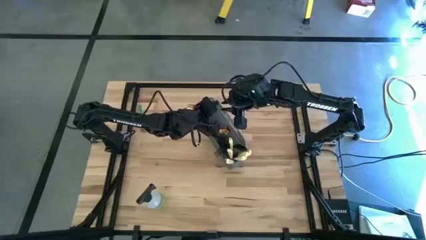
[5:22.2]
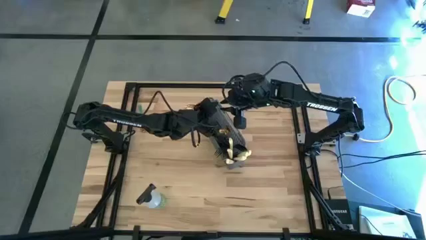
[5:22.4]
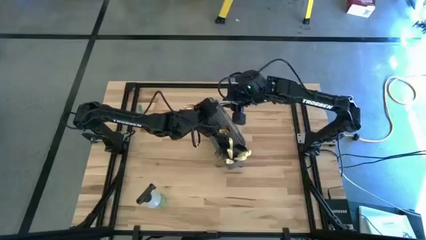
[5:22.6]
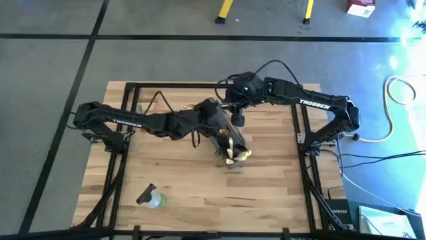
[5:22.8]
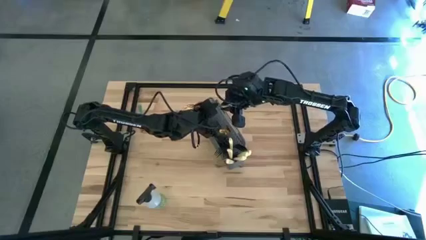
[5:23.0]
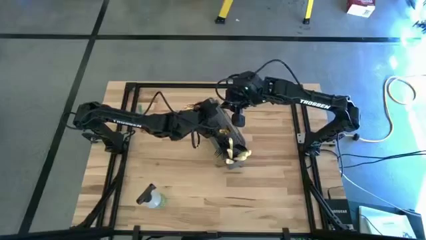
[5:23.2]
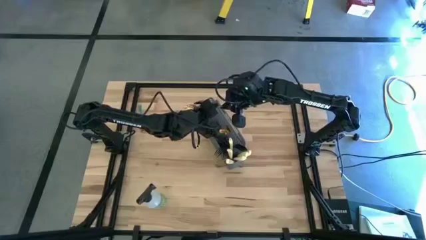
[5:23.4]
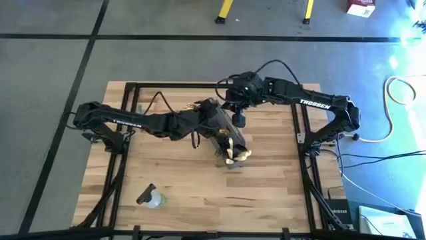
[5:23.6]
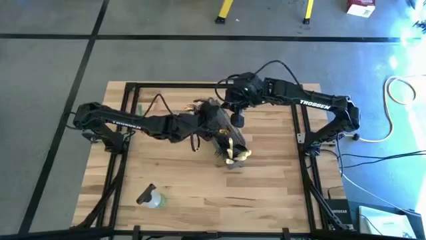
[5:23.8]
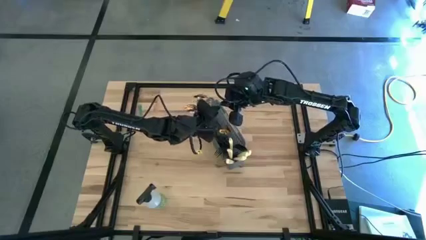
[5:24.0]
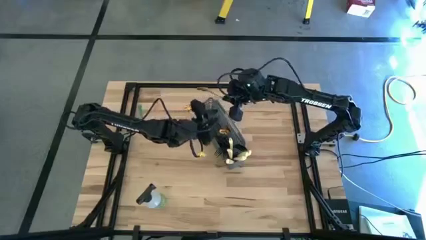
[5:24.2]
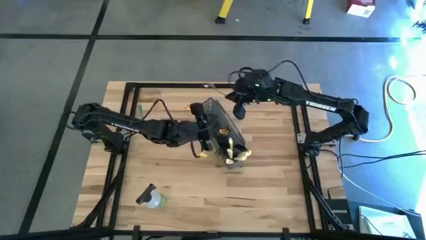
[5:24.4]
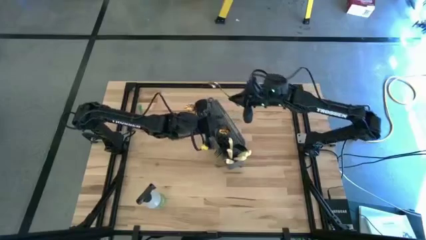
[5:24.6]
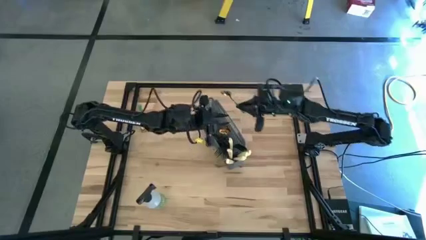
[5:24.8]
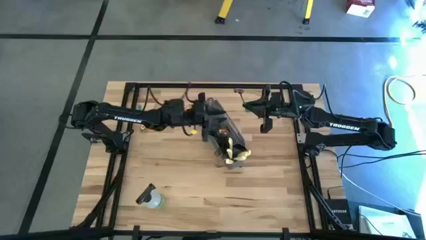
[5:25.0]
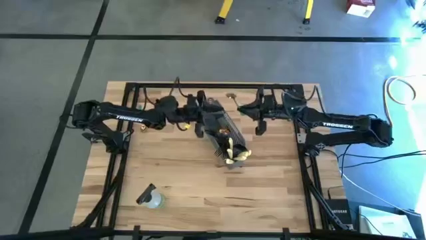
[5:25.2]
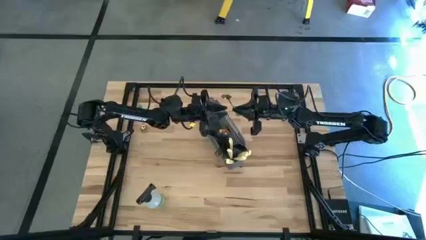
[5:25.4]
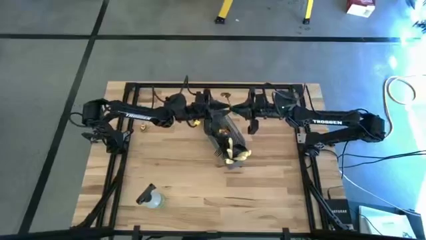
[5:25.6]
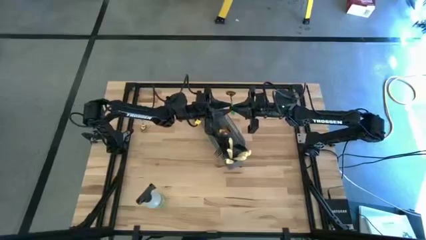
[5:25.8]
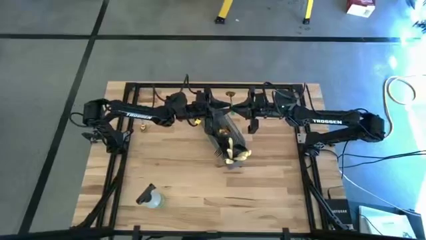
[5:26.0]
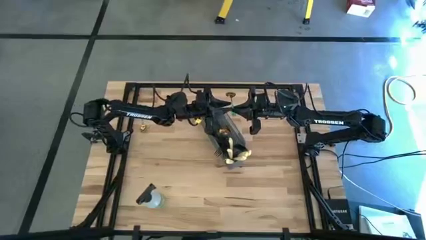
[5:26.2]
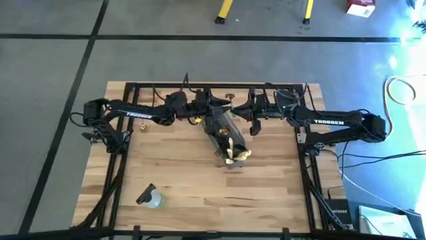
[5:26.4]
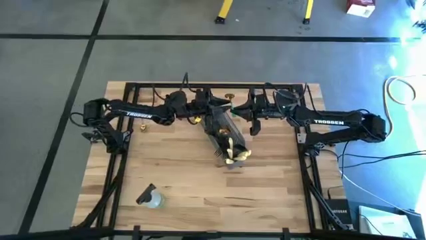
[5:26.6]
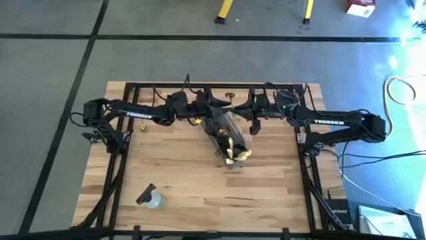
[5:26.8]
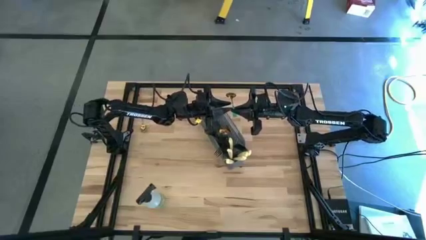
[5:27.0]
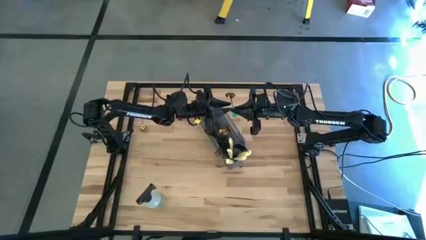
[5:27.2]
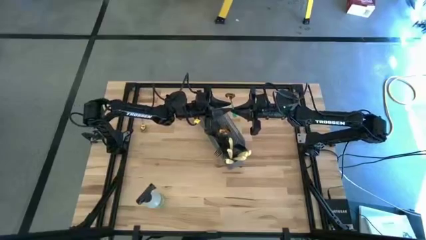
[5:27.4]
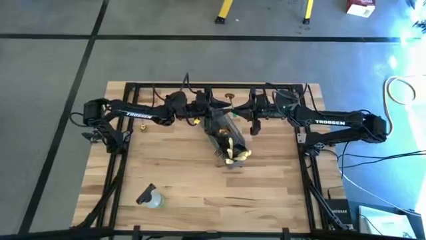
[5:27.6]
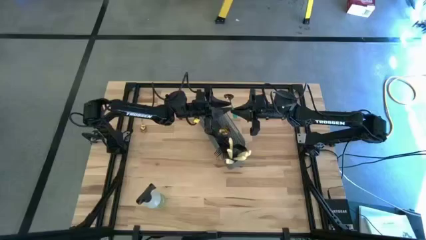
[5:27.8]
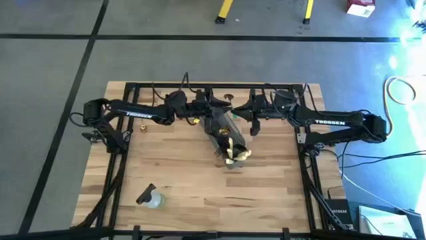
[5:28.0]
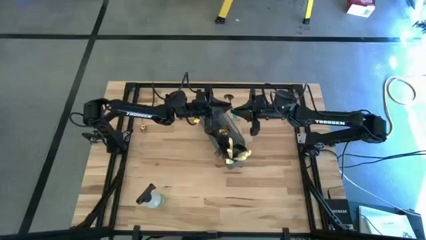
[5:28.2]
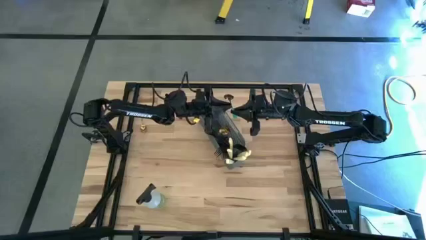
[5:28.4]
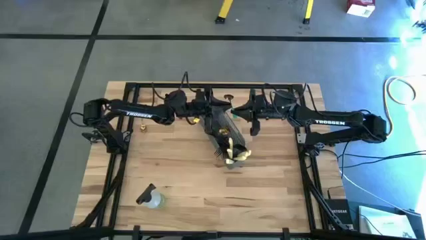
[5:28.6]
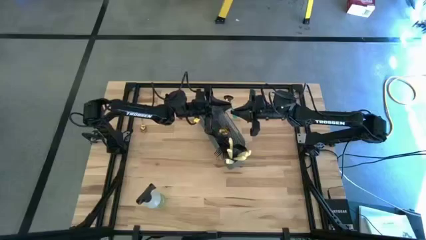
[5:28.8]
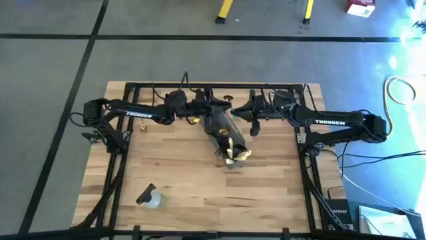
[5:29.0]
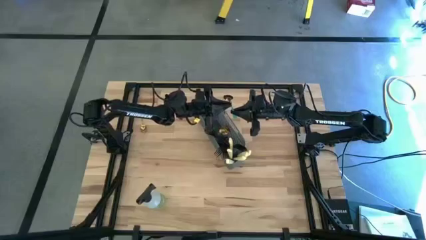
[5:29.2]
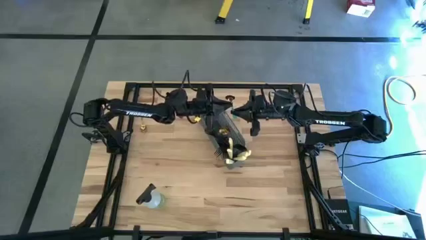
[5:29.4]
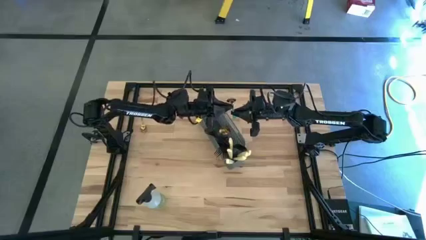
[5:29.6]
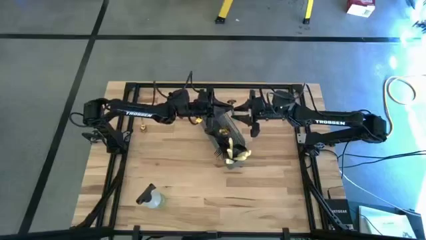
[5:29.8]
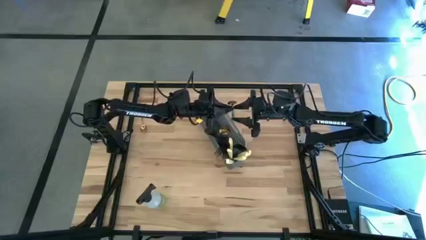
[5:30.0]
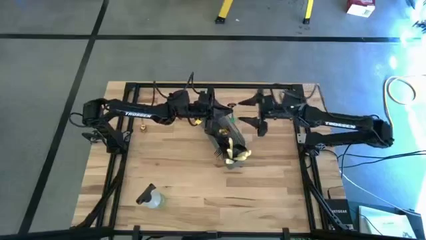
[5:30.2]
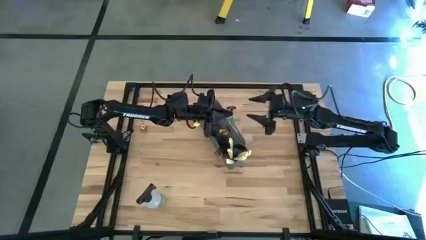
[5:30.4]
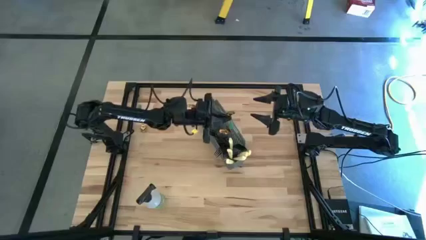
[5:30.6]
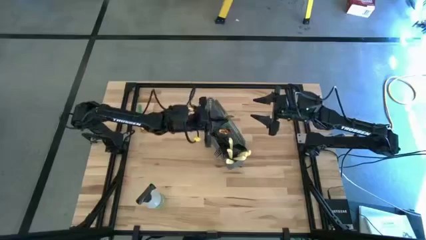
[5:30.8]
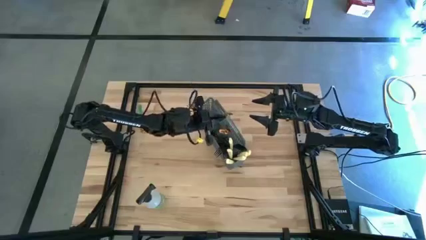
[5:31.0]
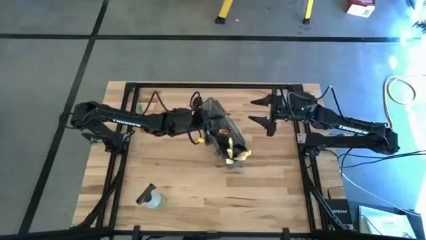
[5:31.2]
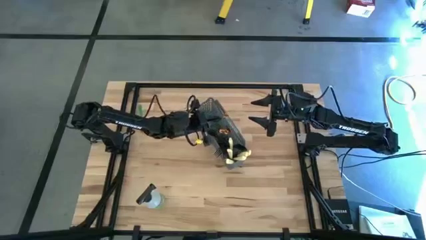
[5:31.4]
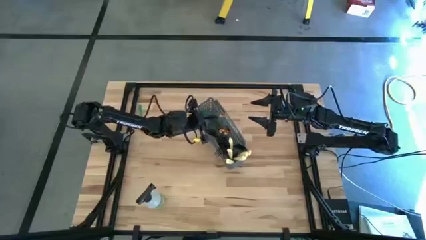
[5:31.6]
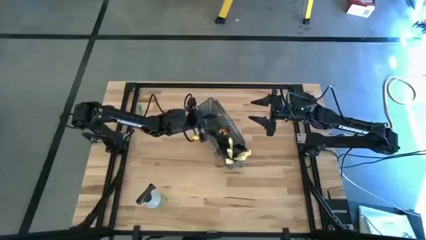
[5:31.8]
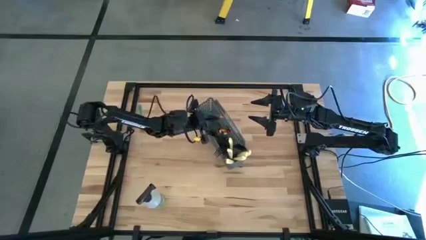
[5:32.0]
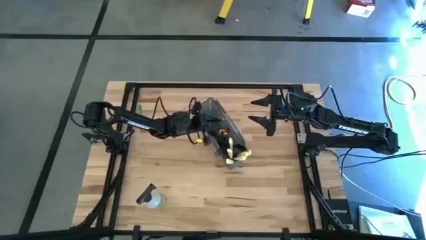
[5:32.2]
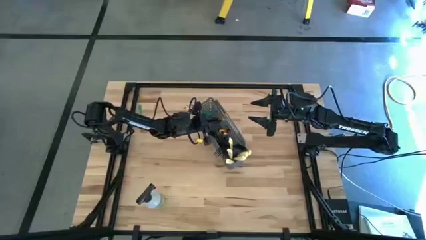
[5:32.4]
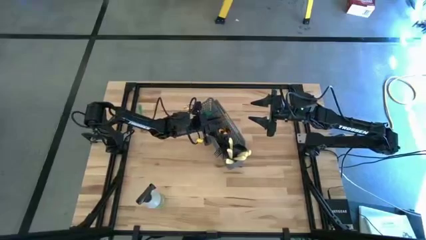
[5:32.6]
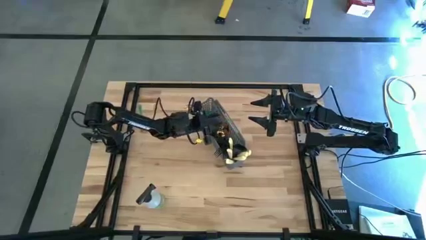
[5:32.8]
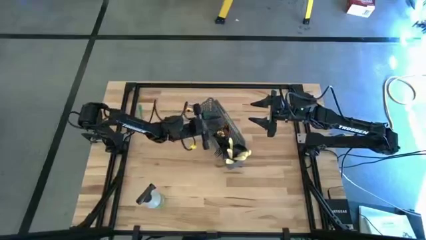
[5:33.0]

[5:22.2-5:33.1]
Task: Sort silverware
Put the gold spoon into the cutlery rack

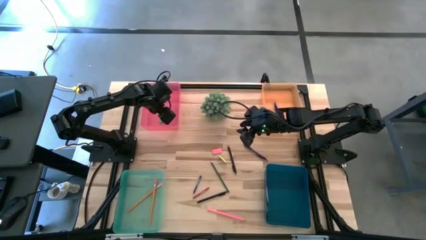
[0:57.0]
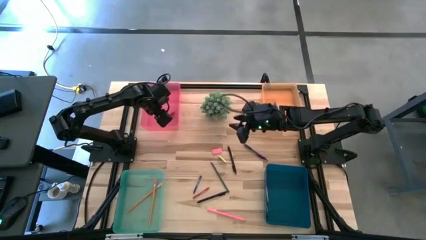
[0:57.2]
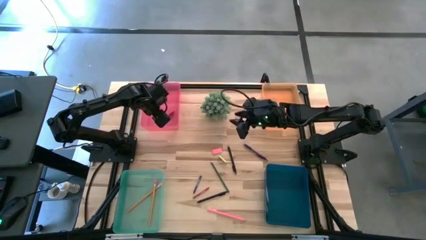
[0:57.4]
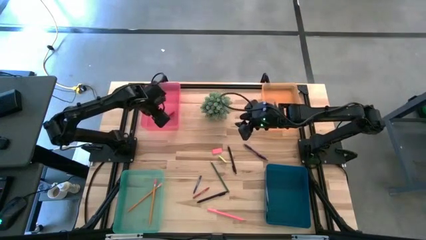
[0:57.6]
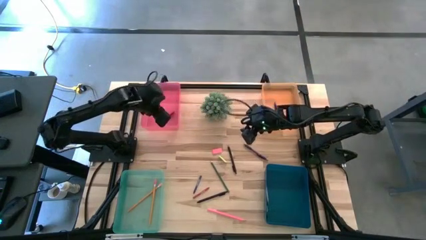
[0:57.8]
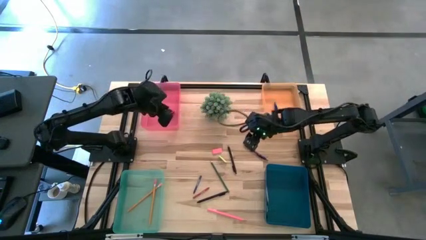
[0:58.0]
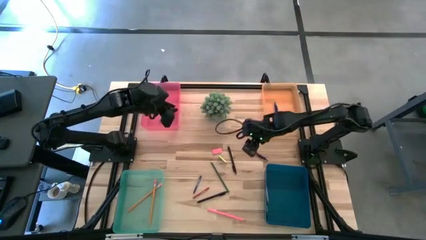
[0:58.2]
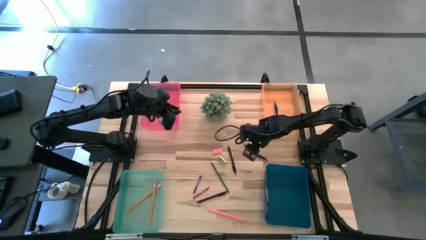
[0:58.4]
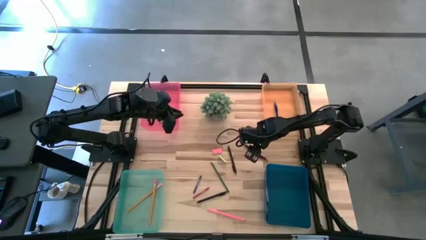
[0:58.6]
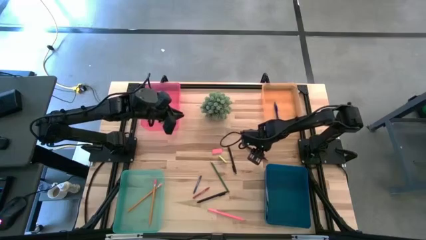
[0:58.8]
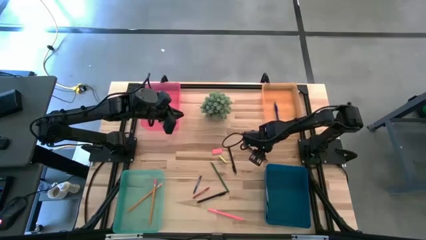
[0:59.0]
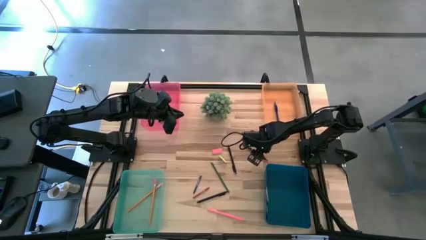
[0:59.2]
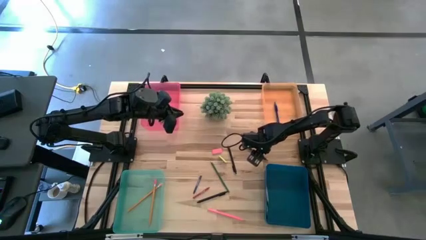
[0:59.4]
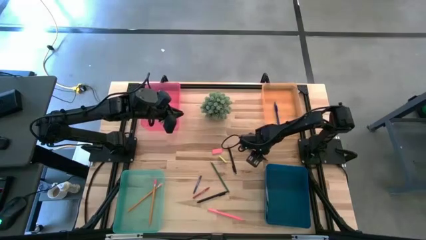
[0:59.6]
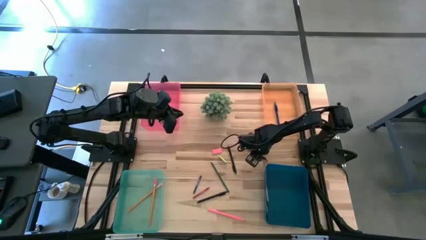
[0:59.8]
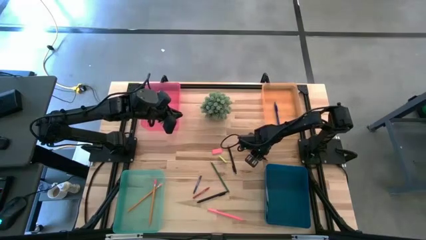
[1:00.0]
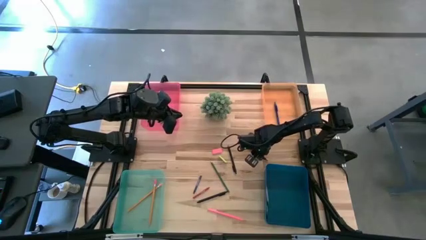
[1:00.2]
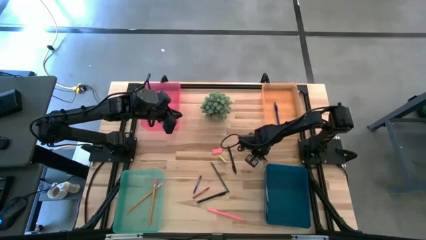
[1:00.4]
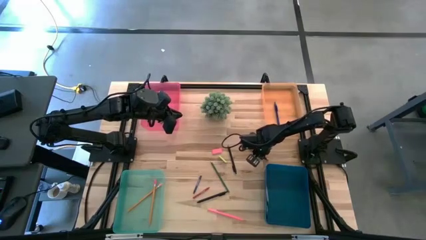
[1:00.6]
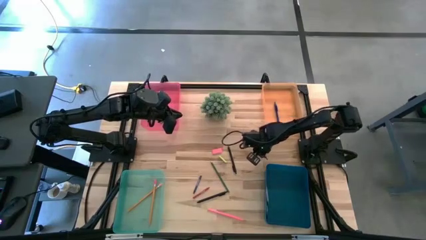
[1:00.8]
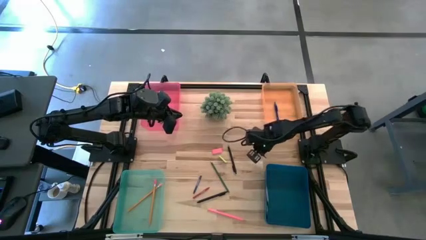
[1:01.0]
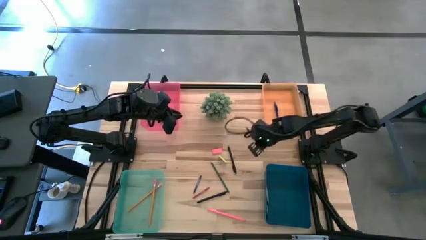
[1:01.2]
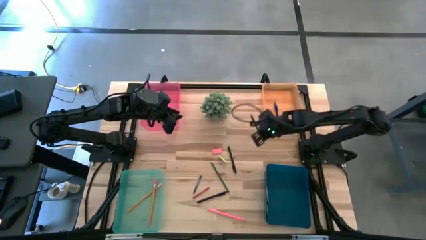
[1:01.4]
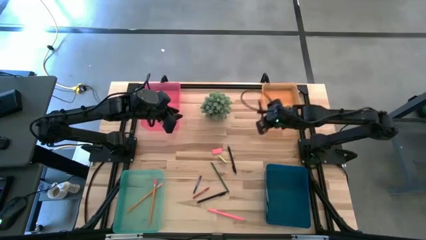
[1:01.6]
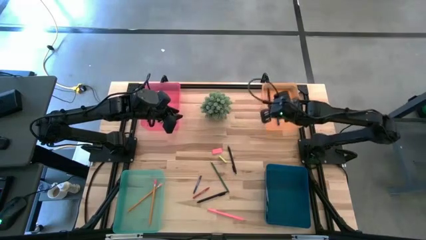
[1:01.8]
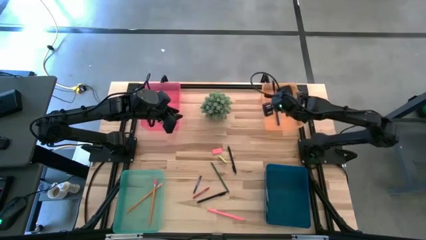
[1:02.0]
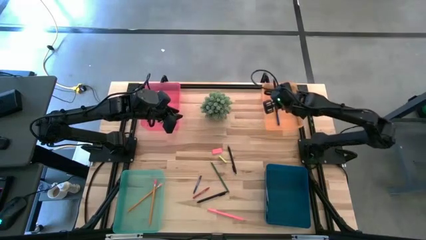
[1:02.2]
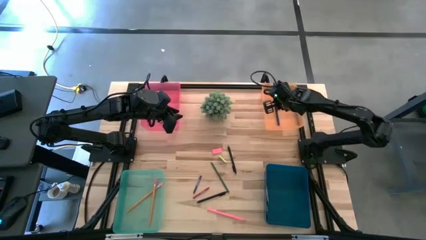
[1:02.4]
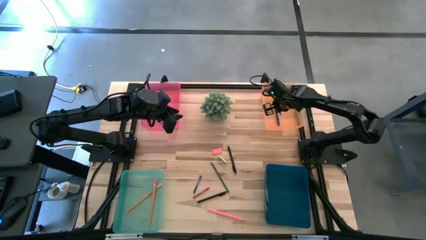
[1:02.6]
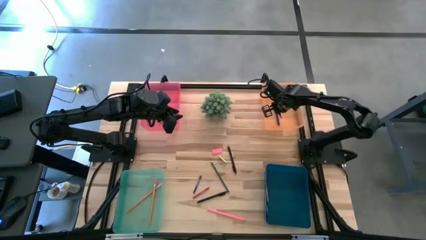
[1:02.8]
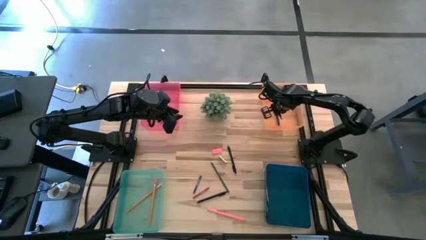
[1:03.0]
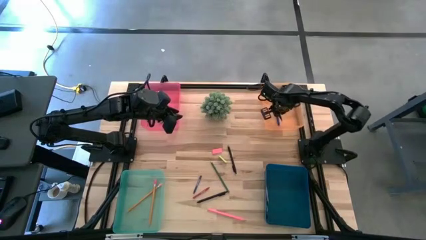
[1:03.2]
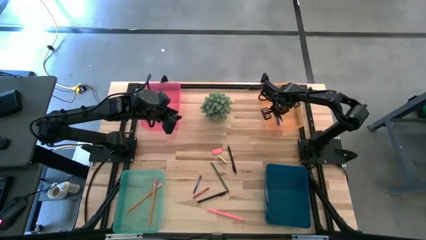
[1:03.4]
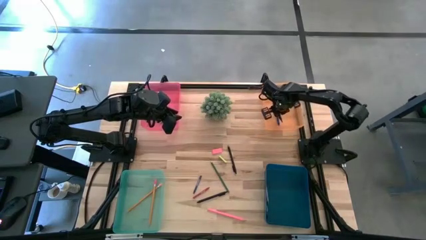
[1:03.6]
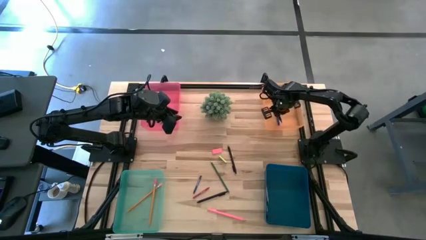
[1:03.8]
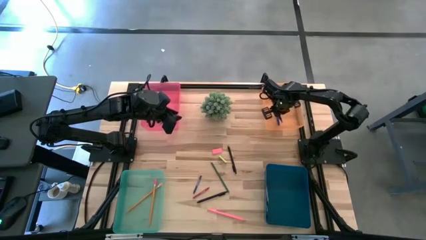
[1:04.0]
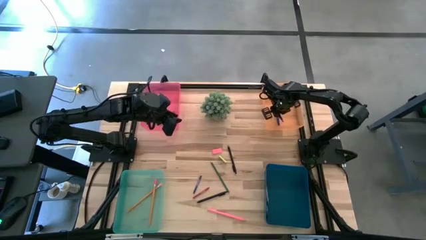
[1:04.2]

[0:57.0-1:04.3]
Task: Sort crayons/erasers/pens/pencils in bins
Put the purple pen into the orange bin
